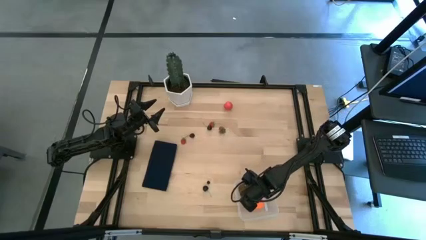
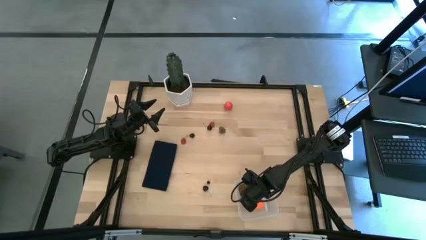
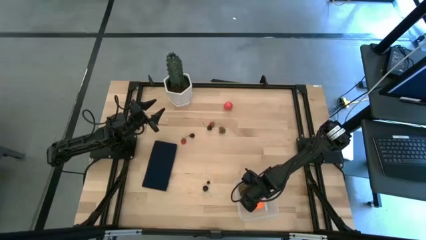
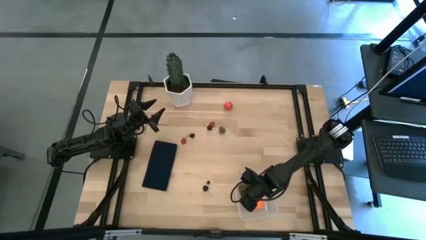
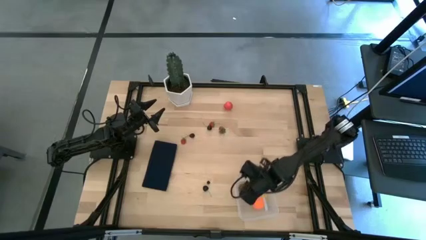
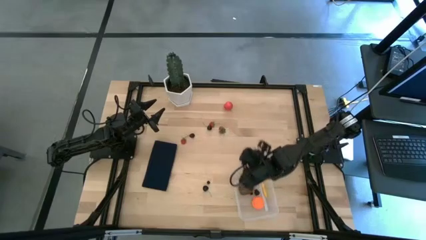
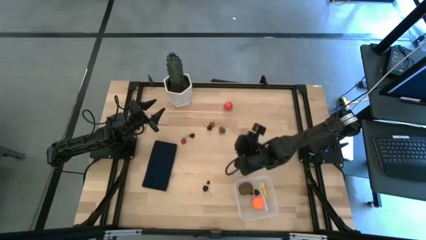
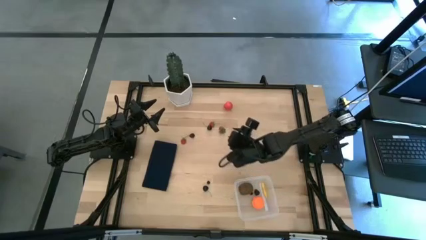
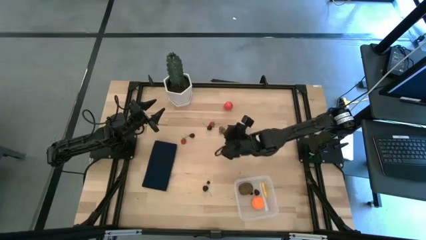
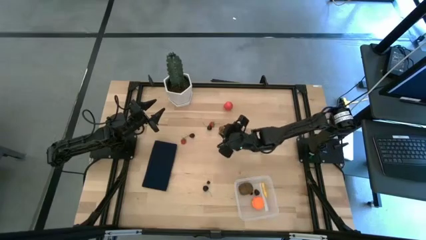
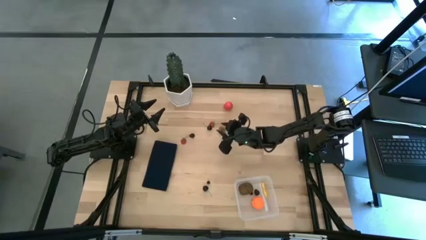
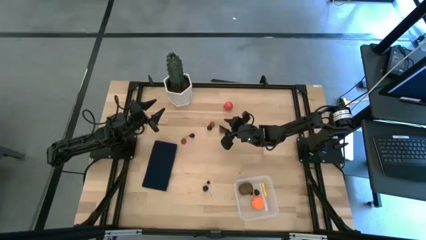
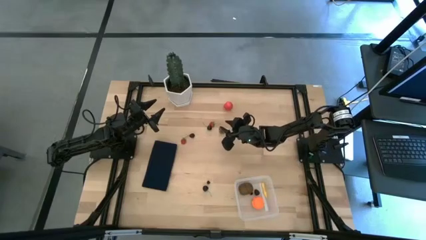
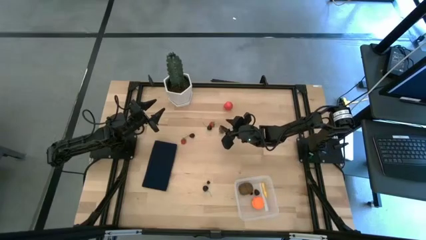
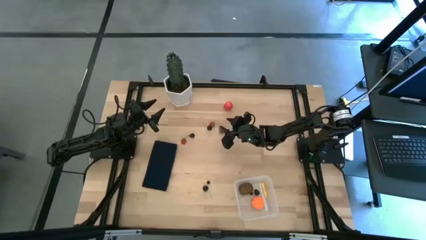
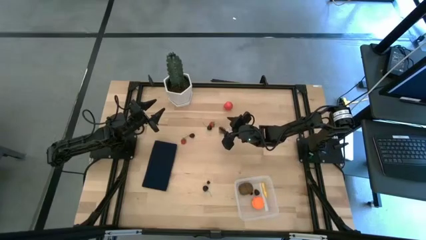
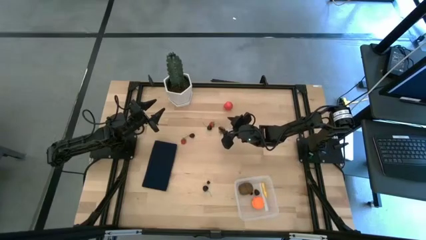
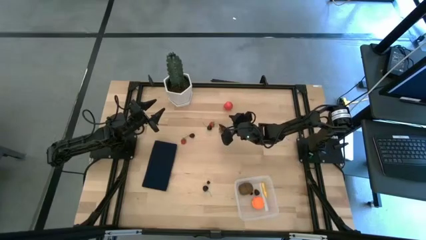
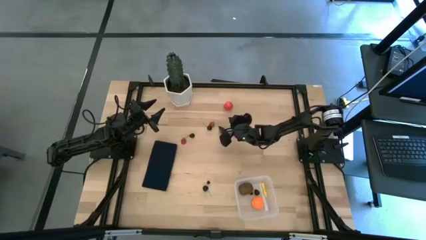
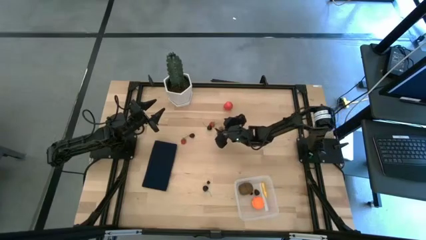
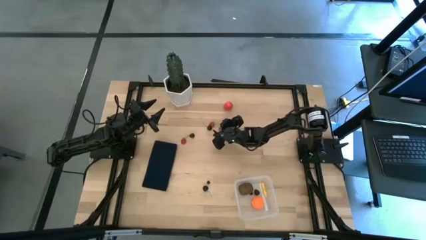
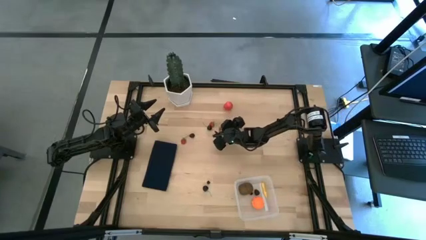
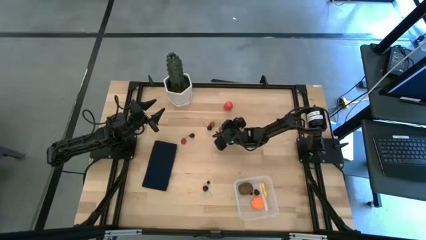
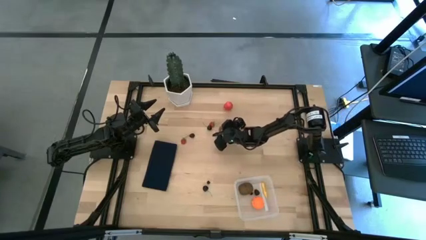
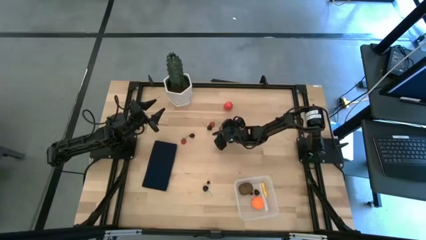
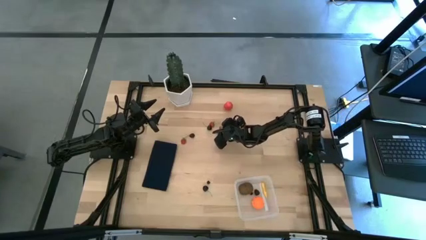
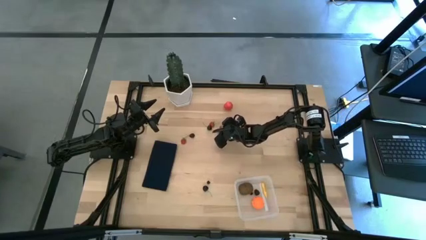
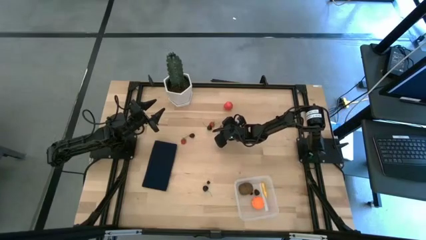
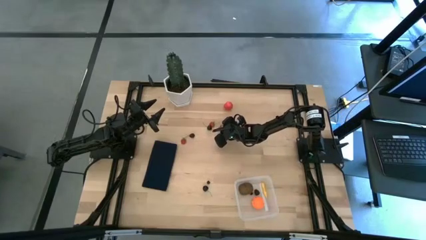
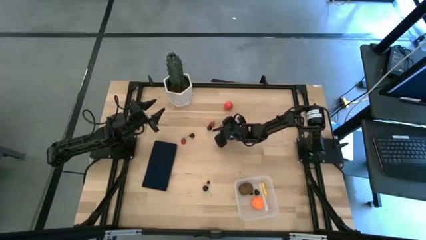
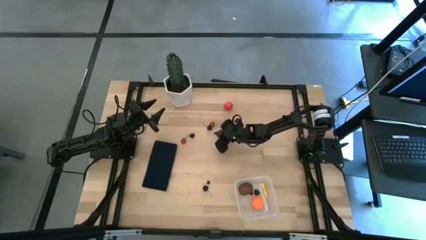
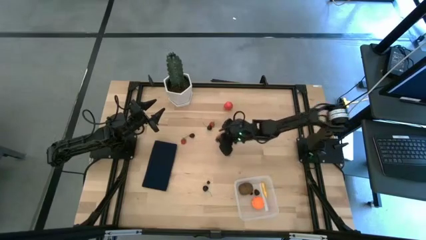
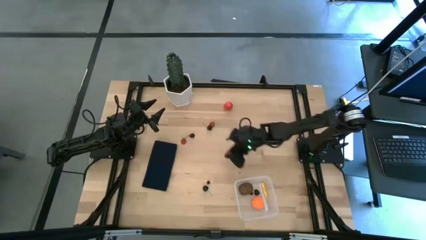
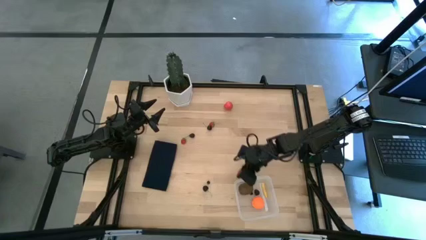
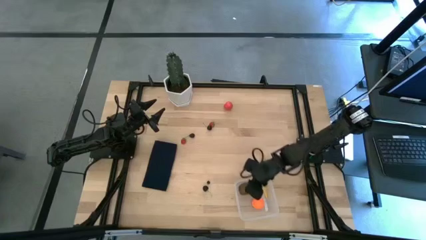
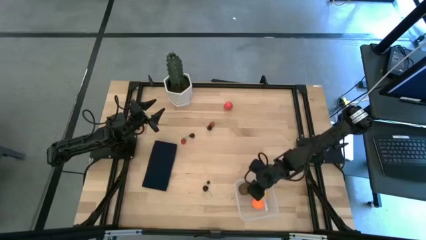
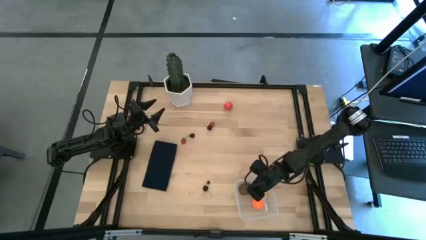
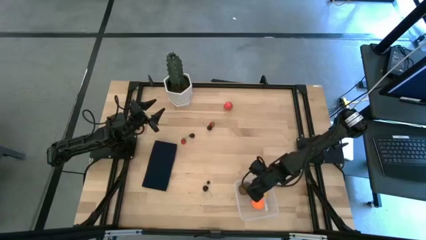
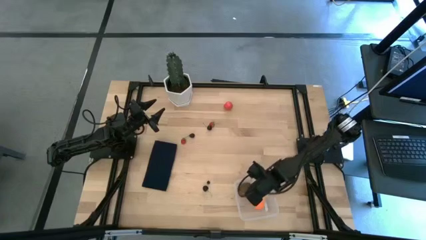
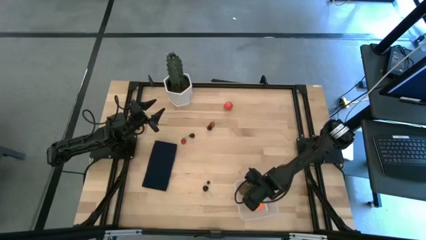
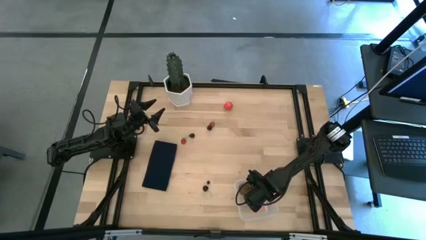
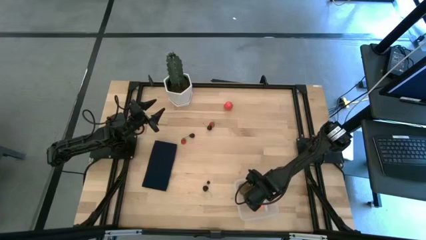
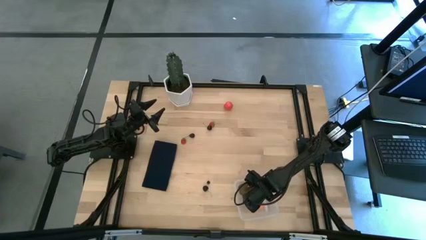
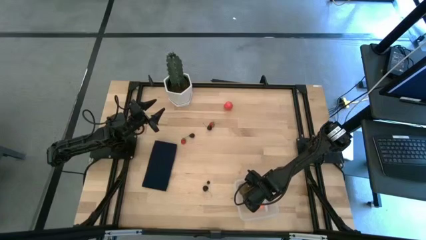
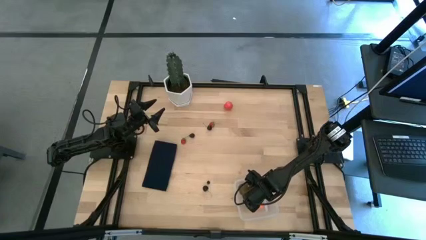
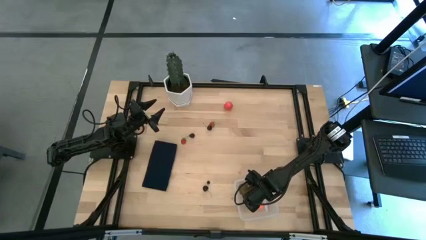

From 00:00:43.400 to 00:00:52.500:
Task: Pick and placing Produce into tupperware
Put the strawberry into the transparent bin

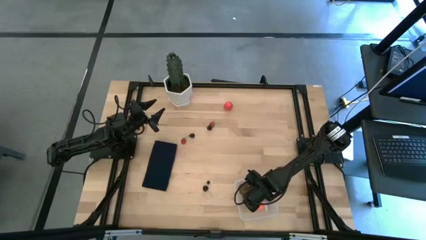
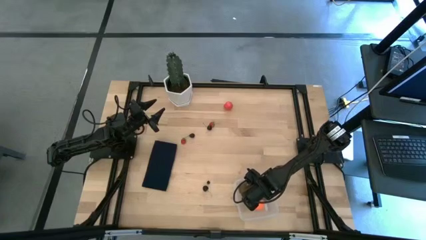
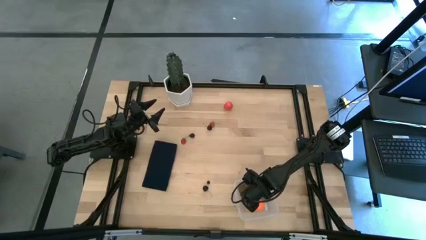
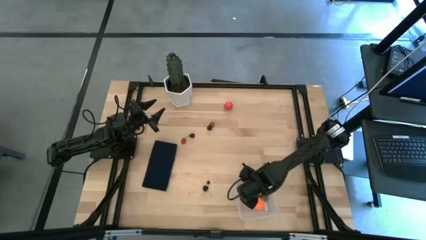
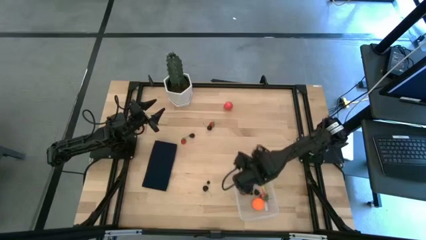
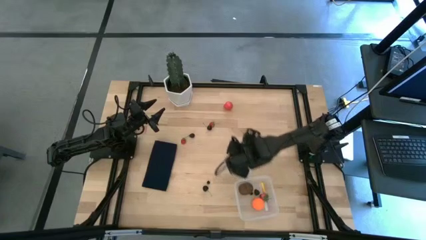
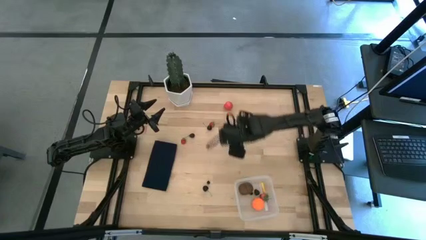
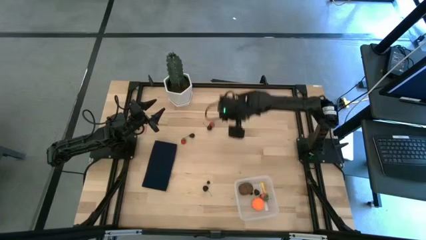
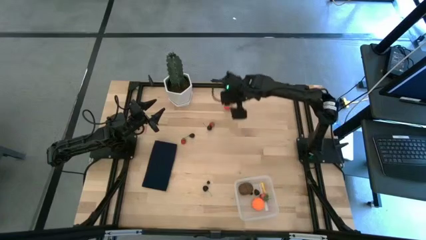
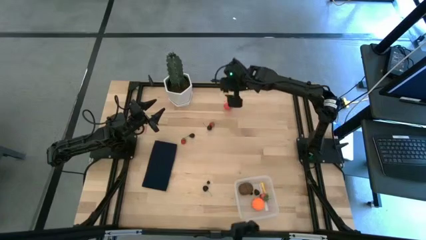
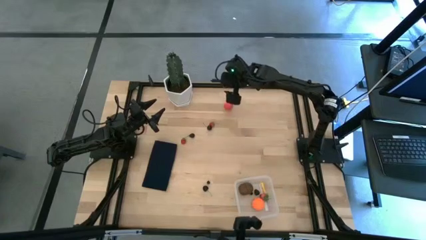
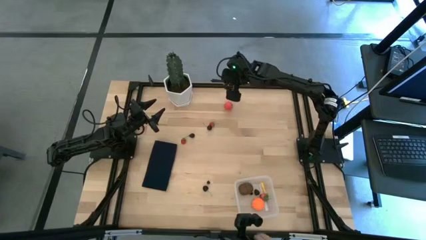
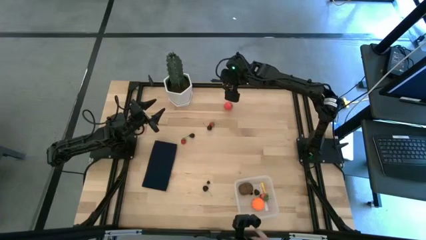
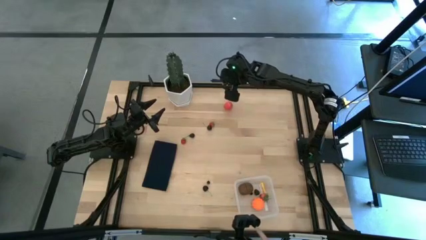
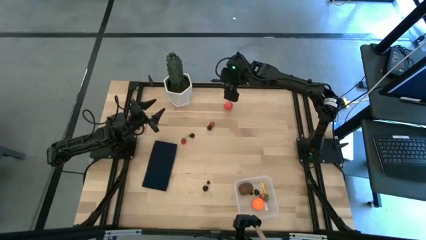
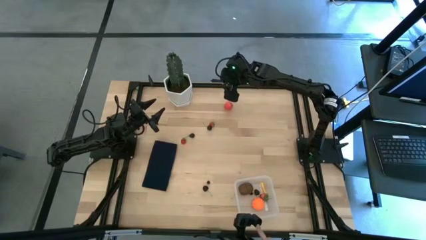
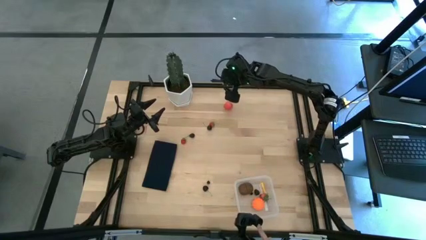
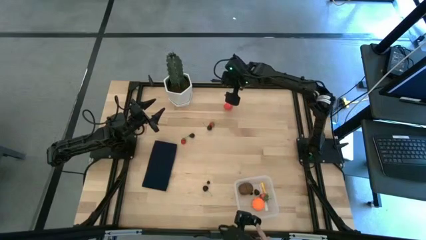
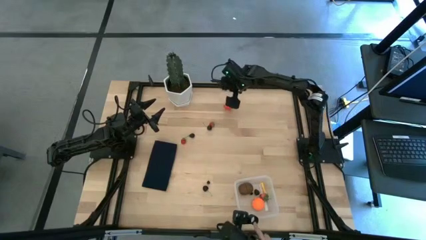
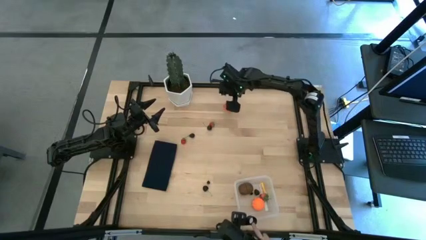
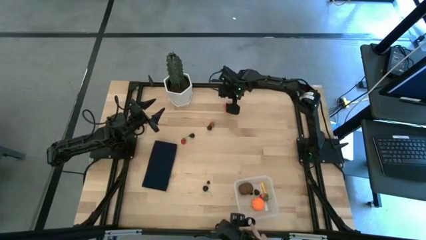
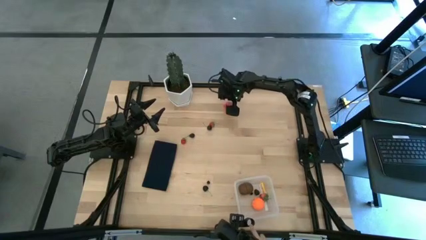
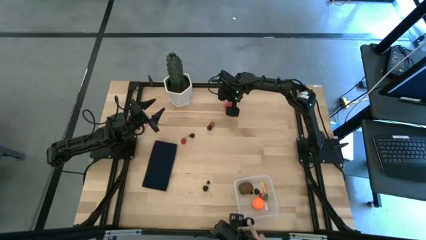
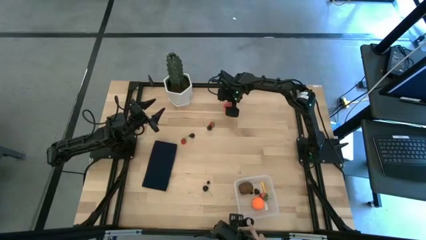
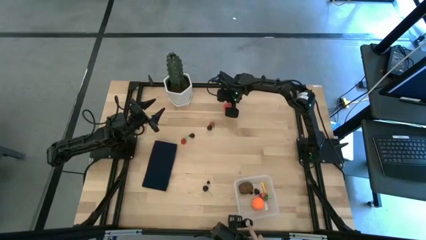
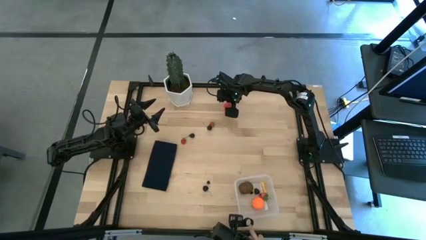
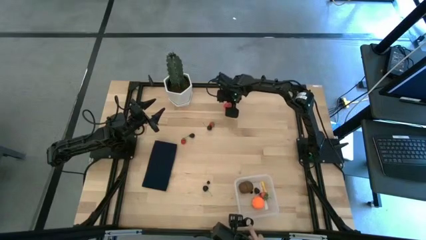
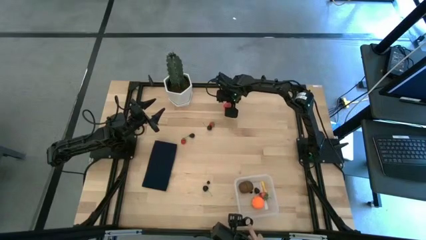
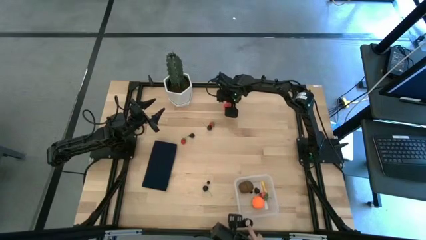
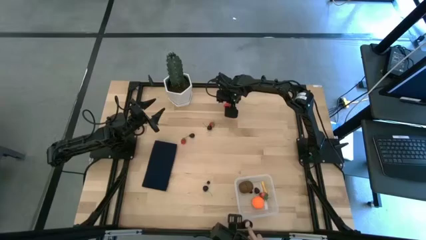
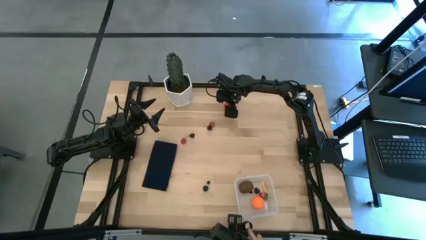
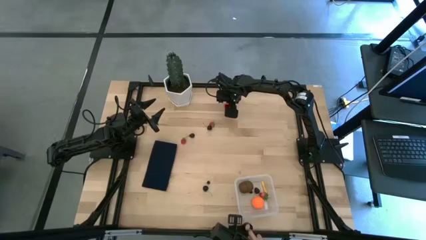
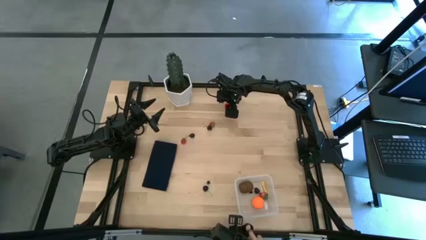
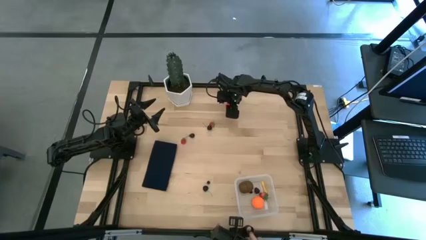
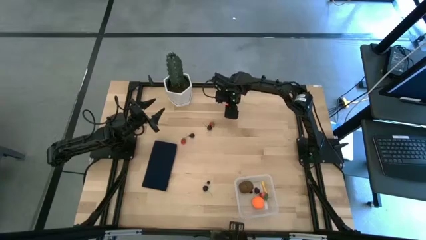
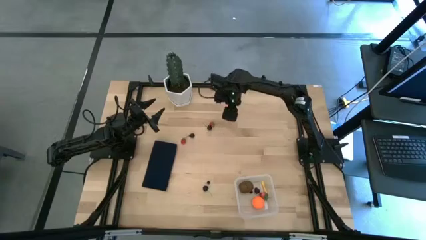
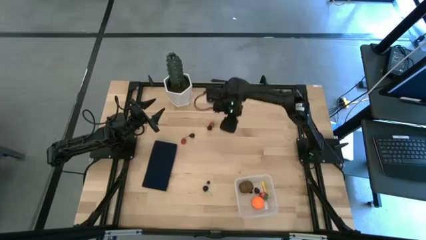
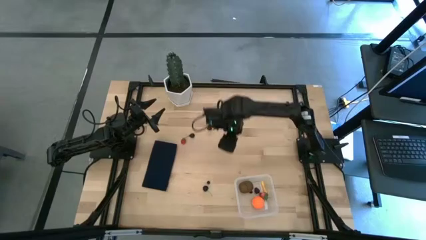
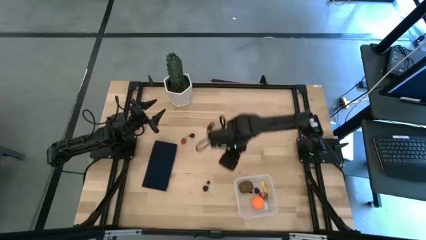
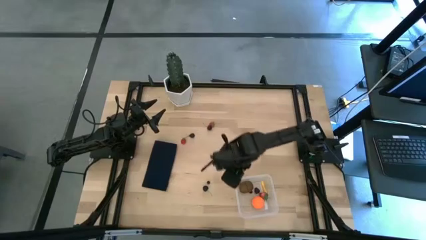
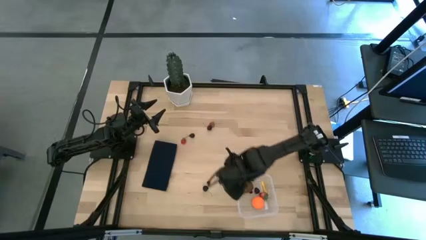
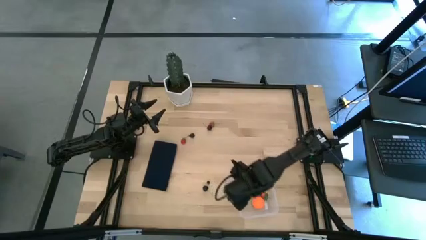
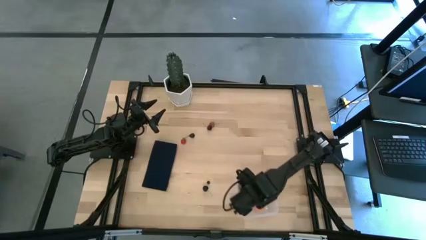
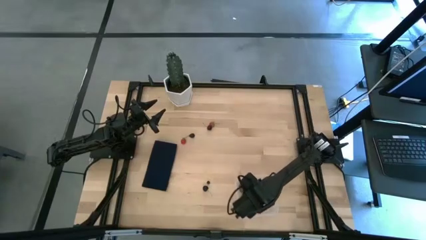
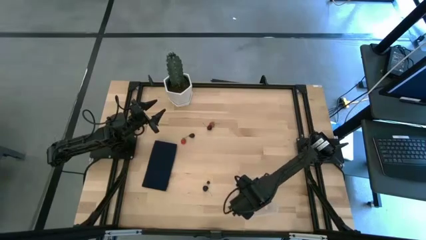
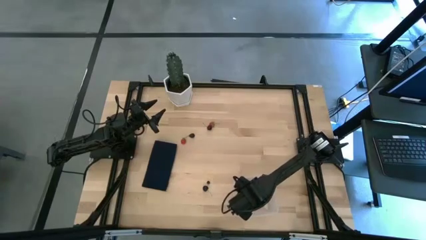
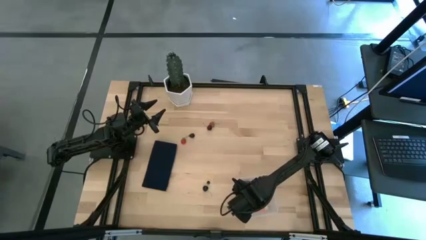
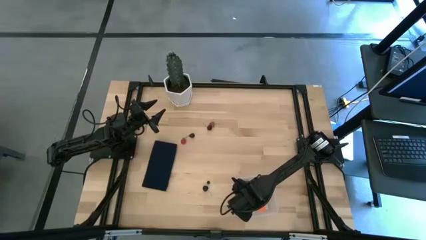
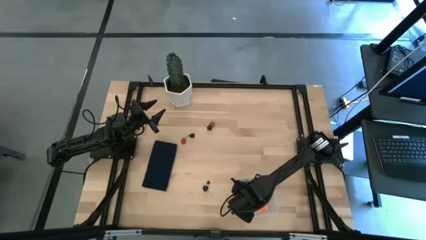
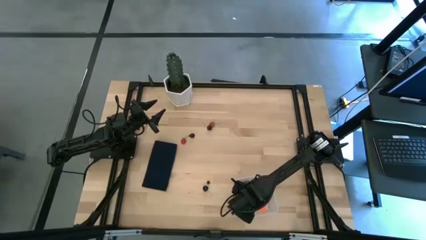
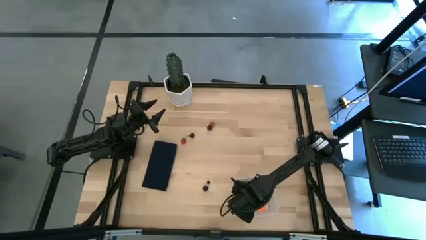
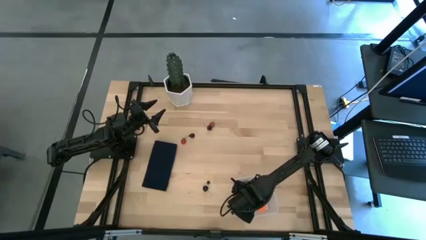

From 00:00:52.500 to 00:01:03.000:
Put the top strawberry into the transparent bin
